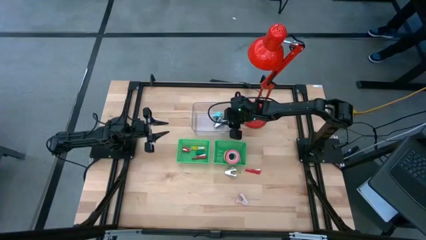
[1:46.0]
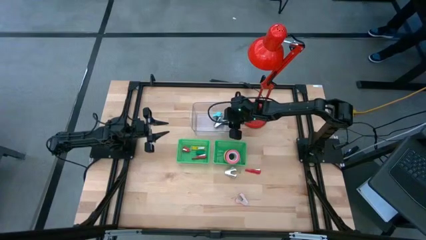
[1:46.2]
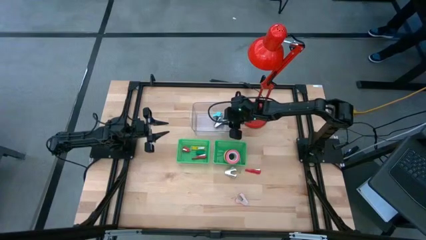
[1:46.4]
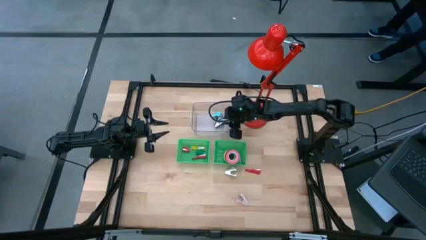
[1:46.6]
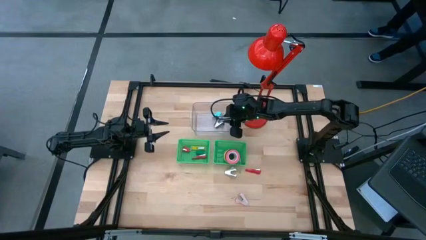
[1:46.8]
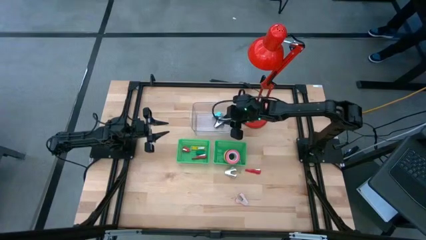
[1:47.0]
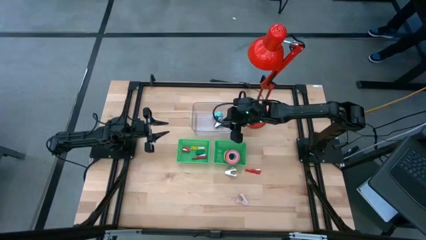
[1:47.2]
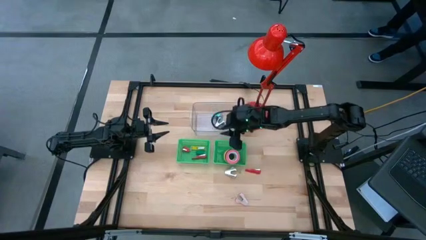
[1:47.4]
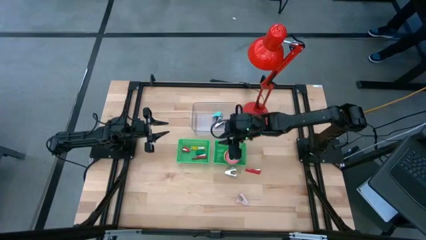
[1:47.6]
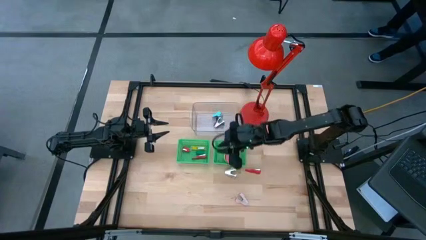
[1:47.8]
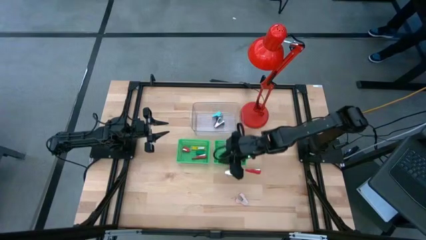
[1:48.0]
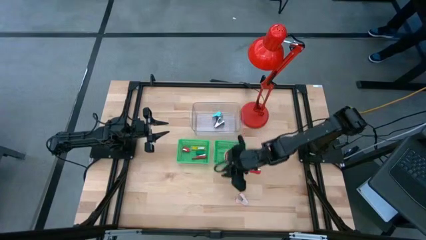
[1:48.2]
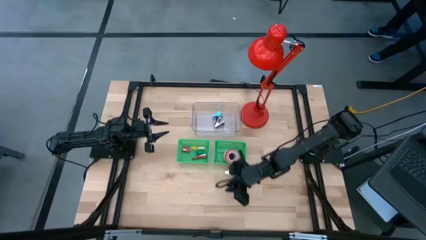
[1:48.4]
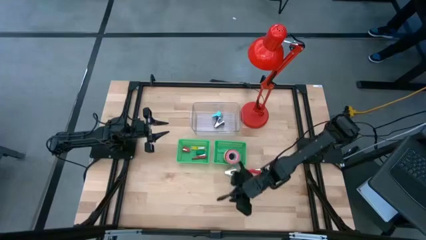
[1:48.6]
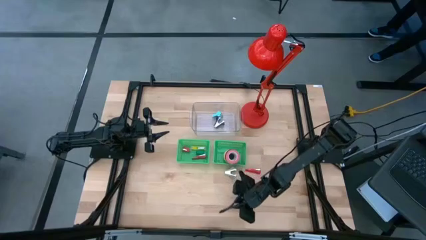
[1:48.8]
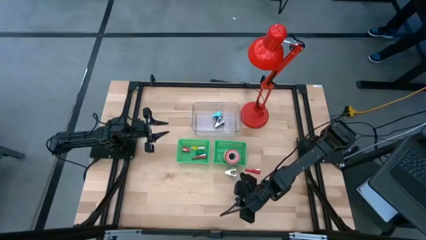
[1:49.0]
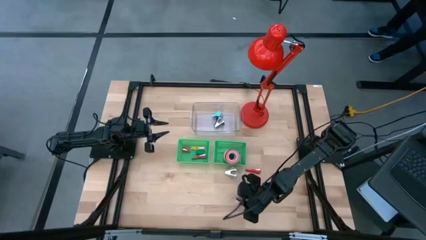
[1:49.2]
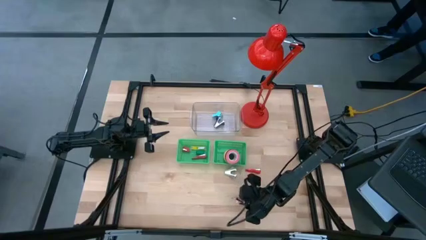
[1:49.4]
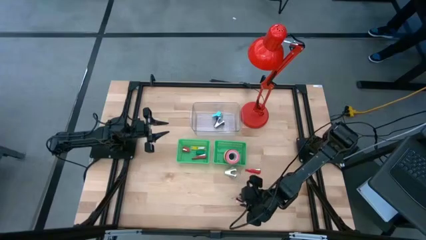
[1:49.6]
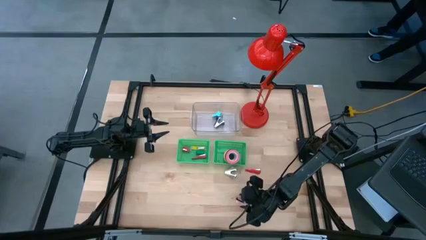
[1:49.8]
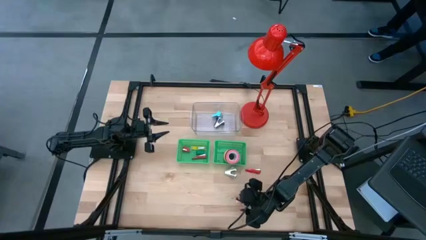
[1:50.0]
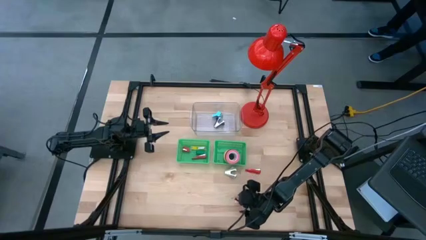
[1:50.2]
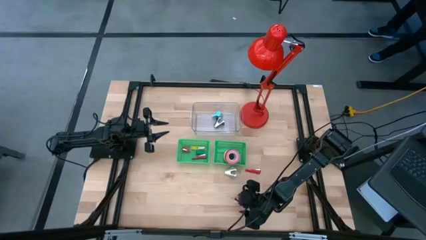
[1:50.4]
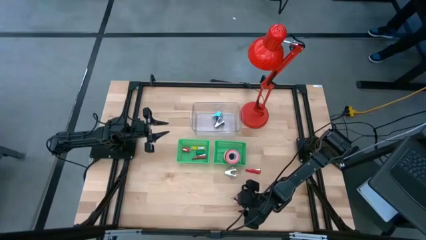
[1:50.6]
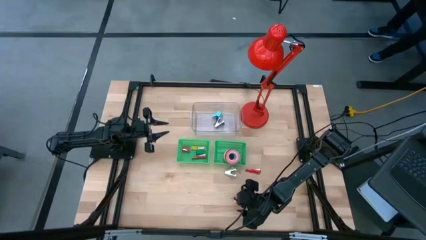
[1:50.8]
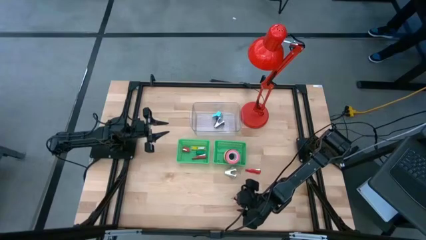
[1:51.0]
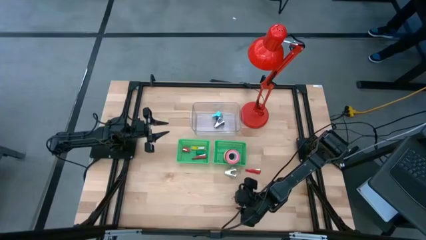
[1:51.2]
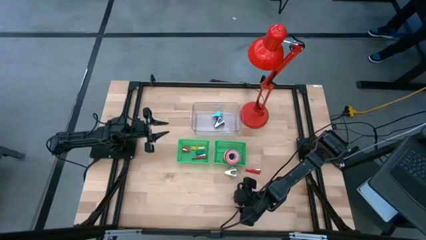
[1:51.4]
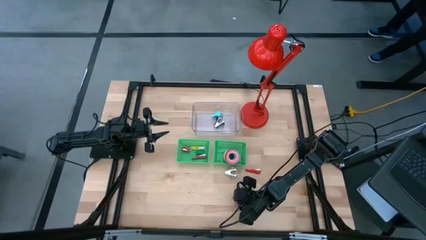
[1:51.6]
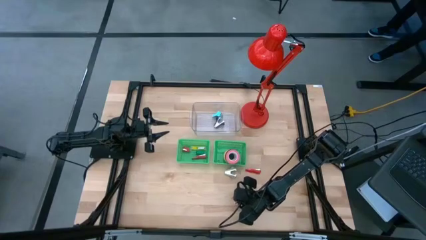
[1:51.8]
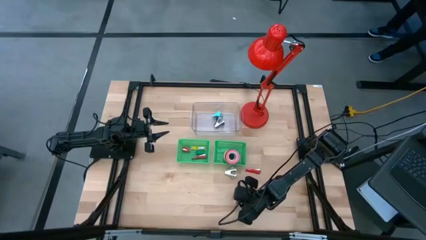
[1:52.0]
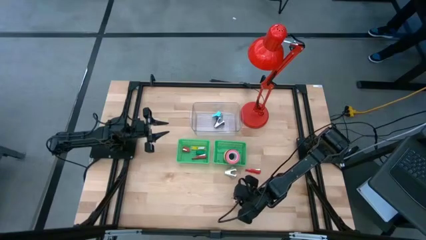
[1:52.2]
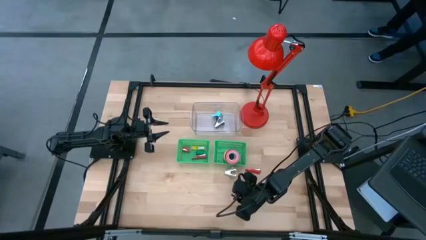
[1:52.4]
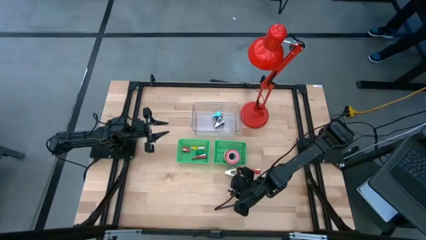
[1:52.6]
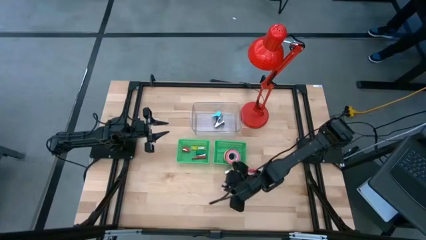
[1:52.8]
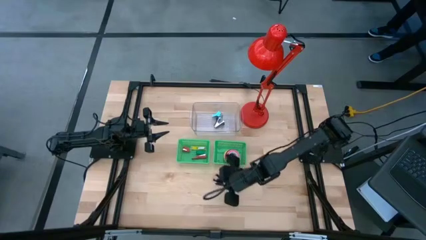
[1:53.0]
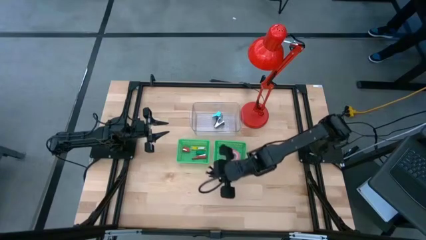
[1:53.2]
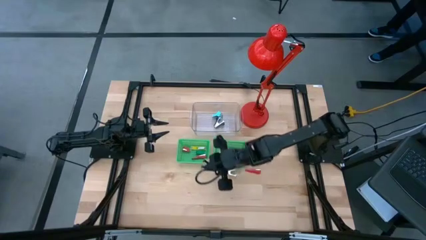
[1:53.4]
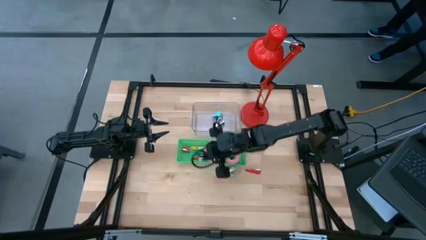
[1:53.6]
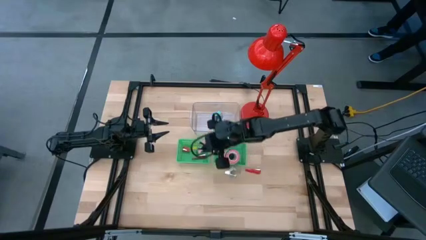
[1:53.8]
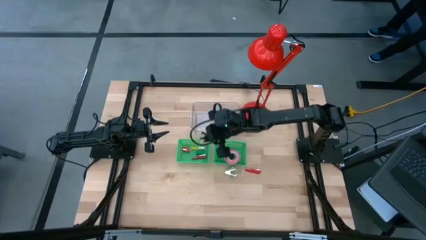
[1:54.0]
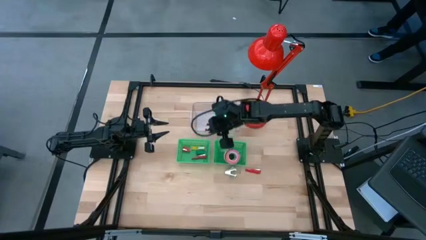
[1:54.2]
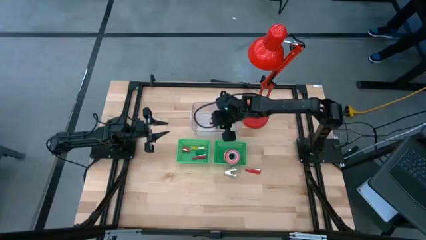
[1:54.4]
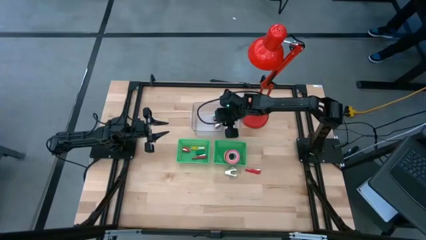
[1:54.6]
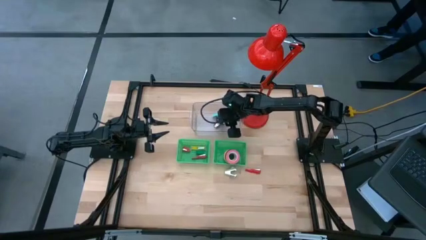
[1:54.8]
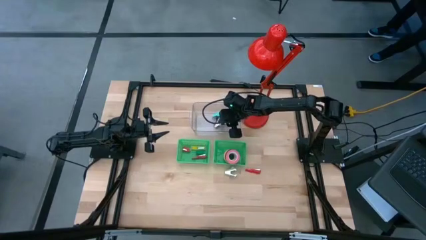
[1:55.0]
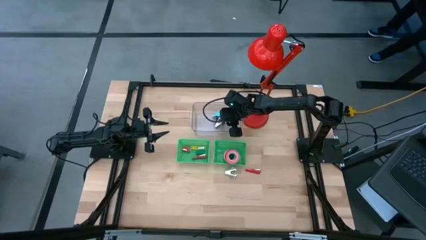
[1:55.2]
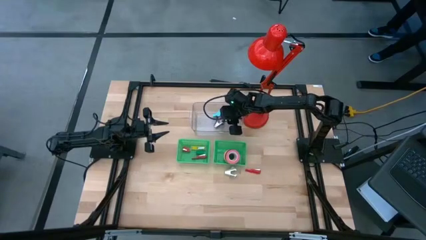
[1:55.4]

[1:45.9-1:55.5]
Task: Pick and place Stapler, Stapler remover, tape
Put the pink staple remover into the transparent bin

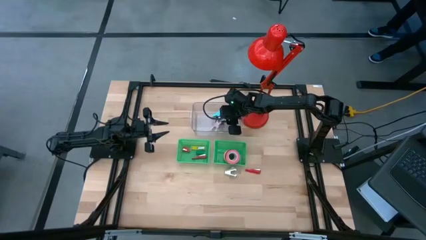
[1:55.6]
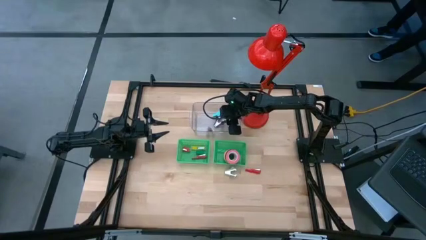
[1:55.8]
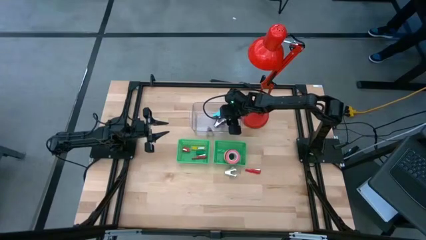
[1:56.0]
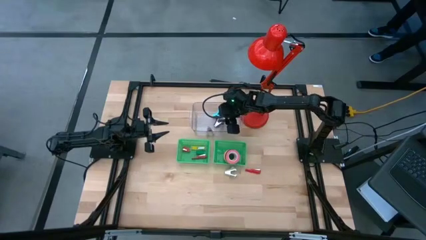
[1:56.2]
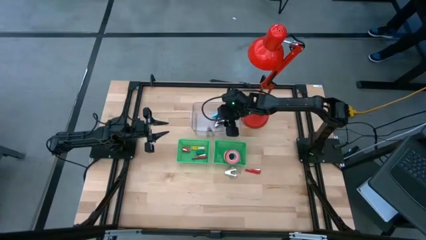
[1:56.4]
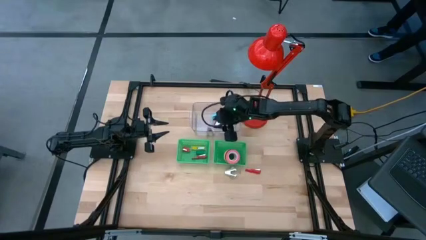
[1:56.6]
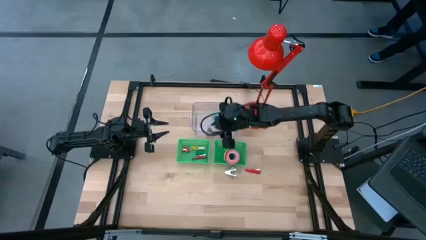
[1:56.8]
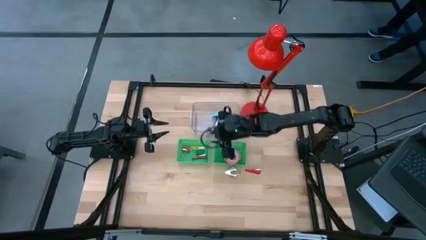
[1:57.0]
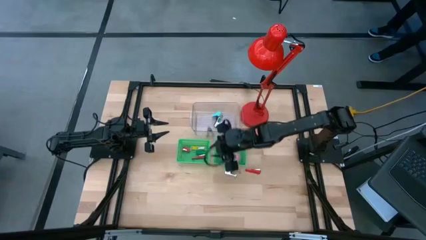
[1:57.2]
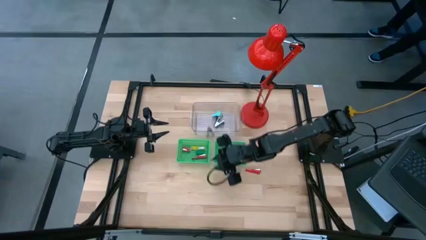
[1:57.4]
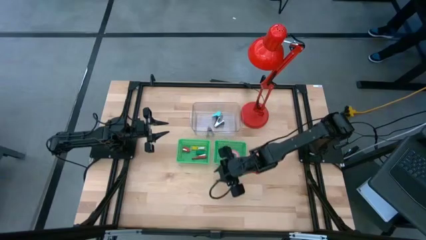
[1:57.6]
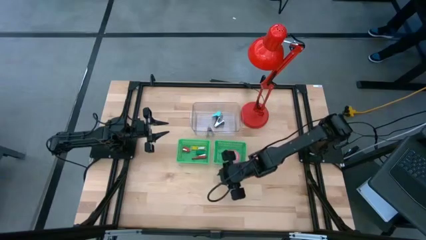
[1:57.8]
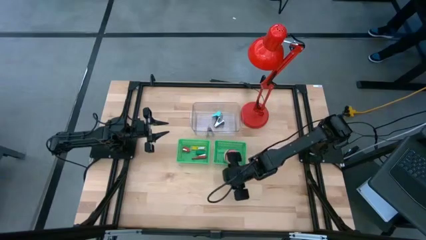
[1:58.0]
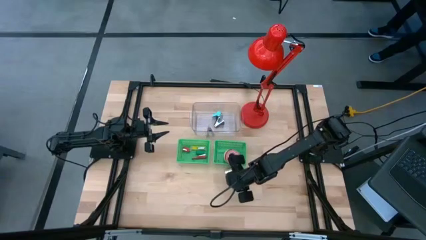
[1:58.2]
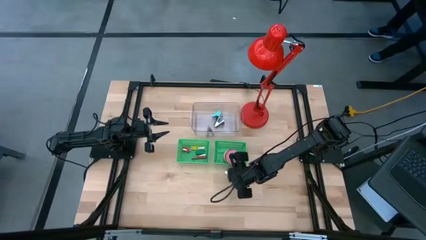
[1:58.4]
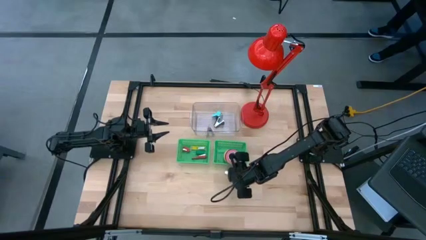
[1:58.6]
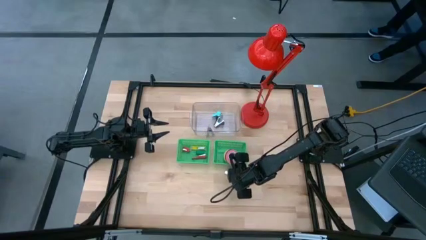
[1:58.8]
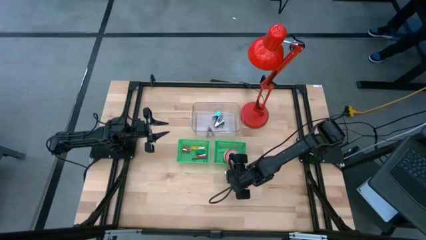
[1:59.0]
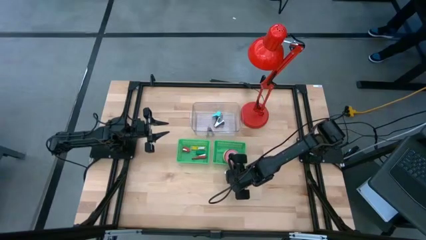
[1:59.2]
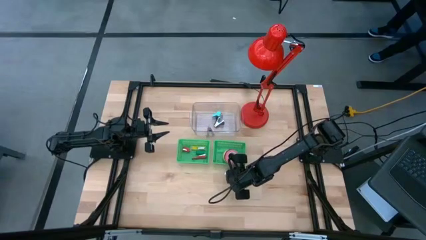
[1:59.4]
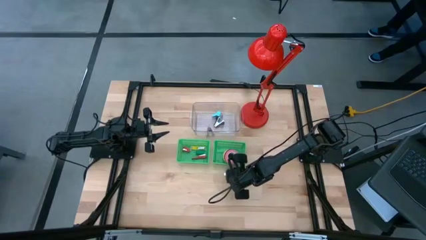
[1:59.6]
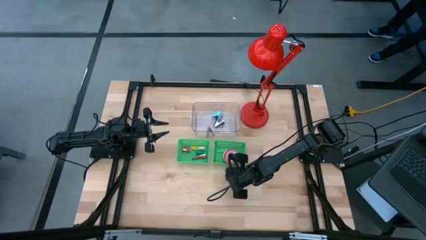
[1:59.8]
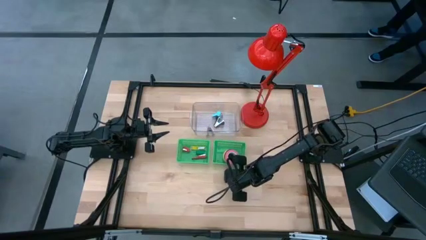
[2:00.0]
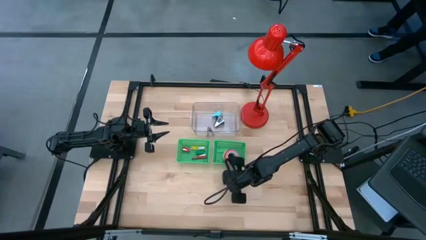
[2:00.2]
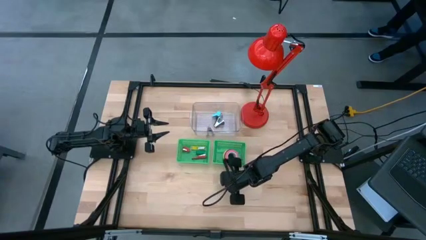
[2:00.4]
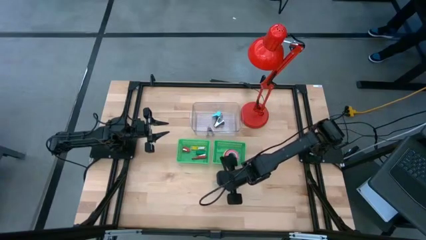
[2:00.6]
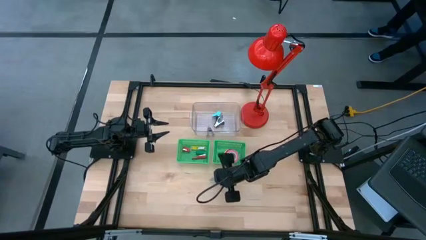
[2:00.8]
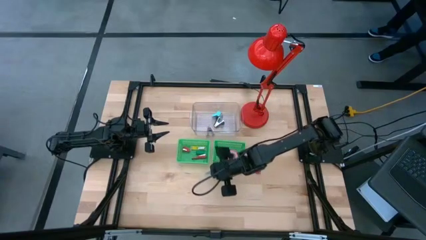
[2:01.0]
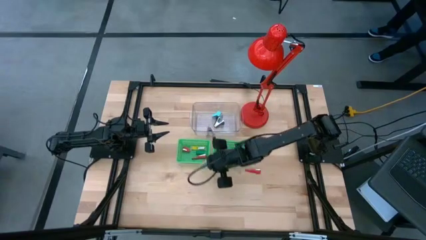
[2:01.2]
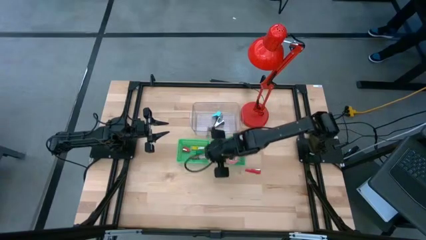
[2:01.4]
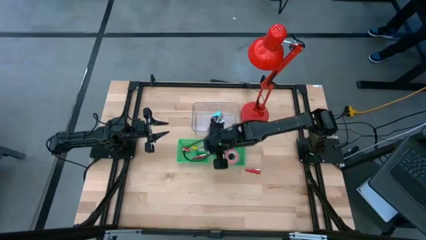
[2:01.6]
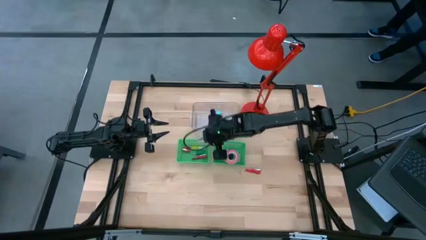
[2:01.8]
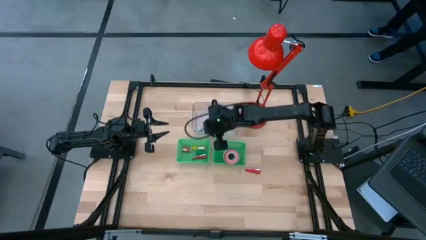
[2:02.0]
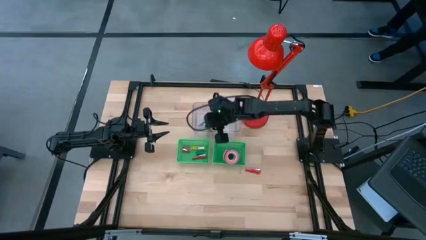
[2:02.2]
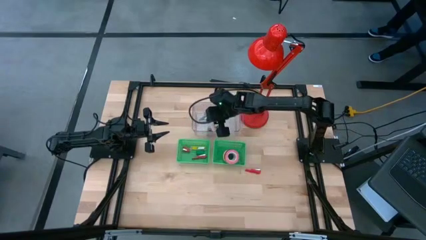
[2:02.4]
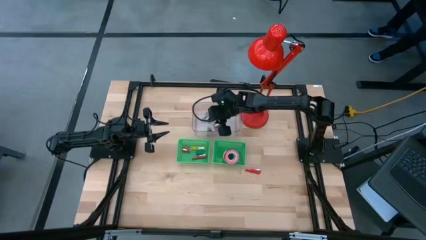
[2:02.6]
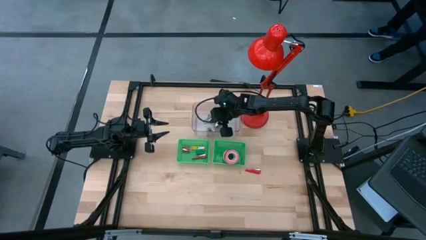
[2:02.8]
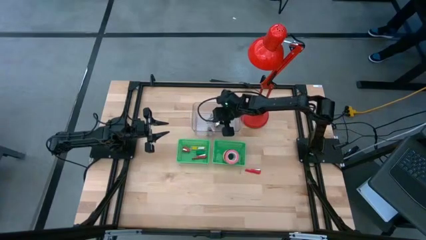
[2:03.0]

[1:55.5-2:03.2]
Put the gray staple remover into the transparent bin
